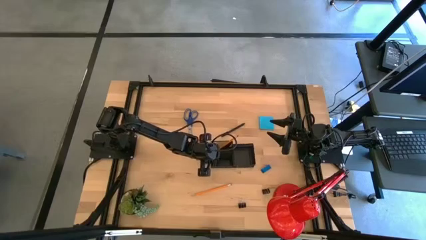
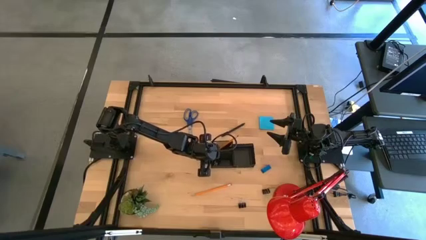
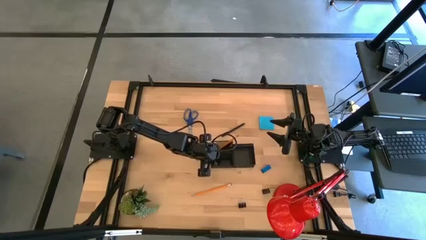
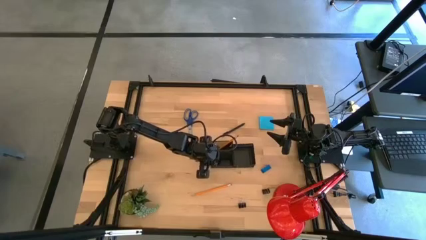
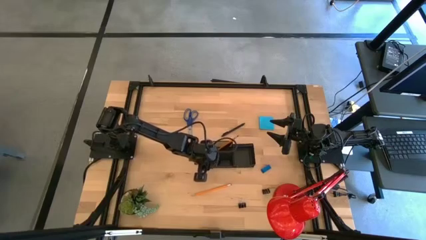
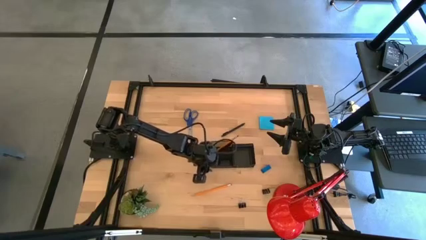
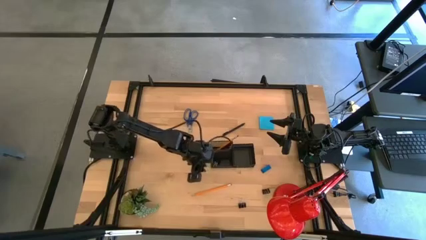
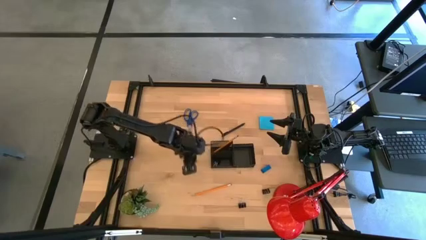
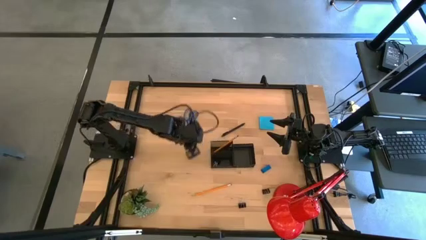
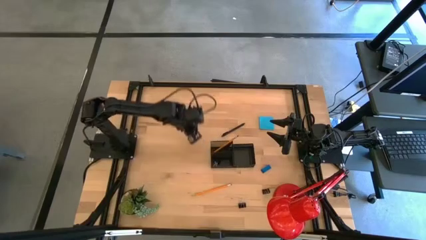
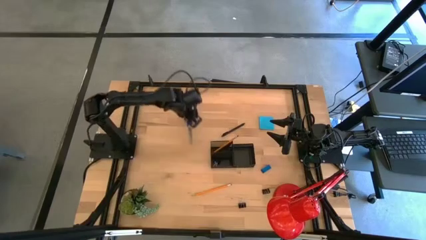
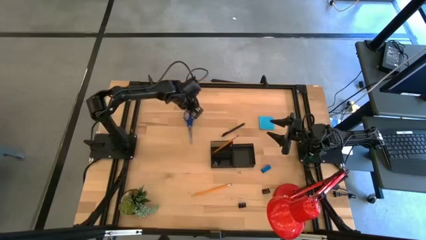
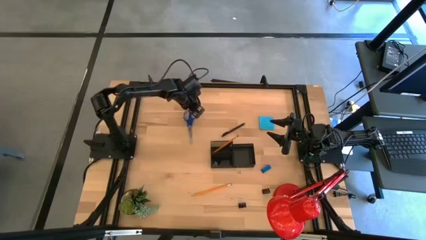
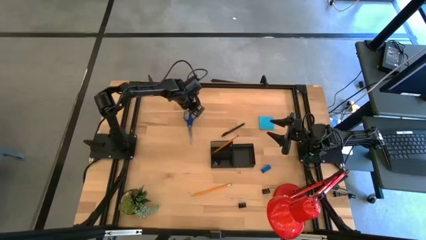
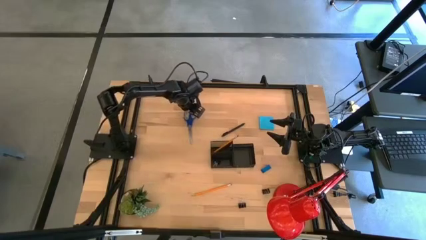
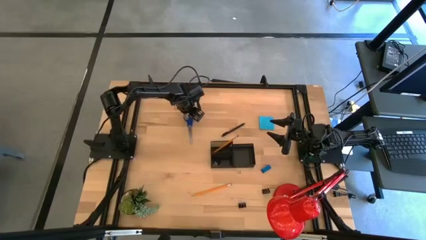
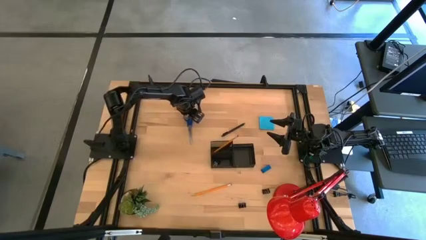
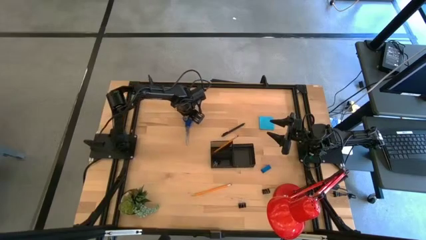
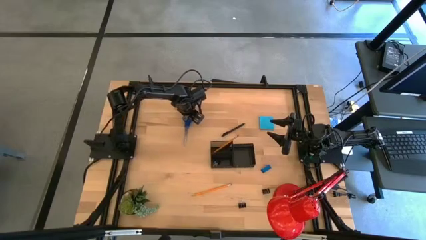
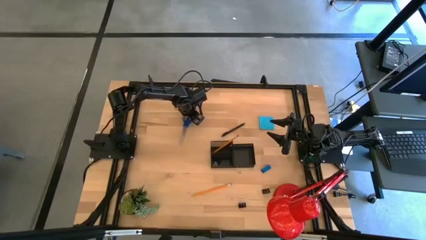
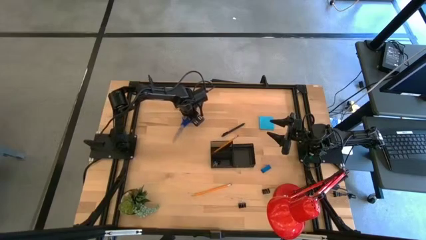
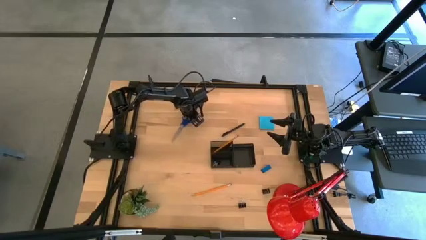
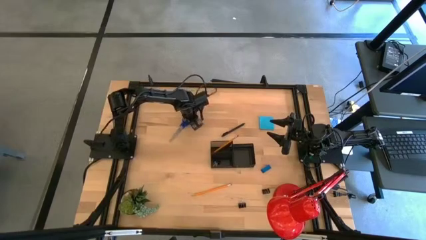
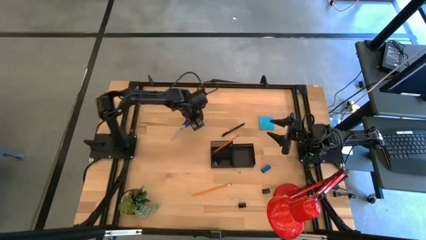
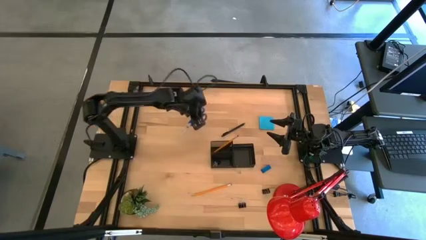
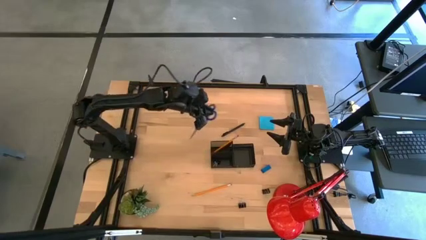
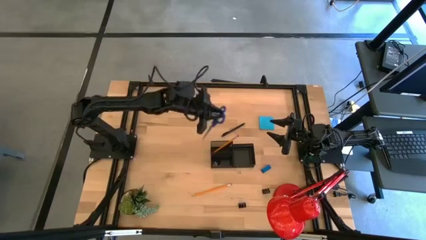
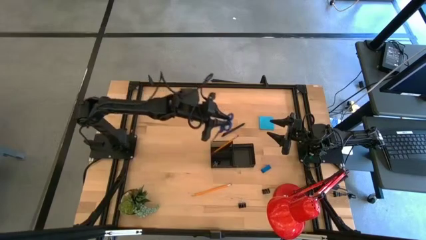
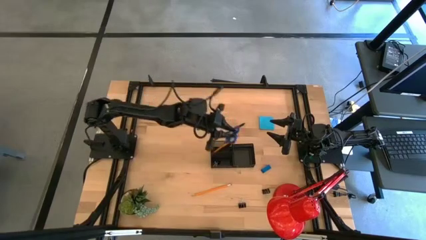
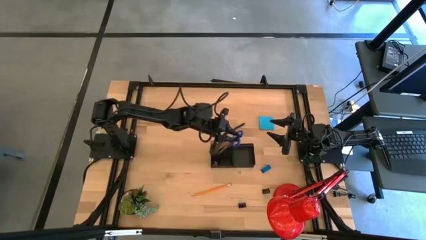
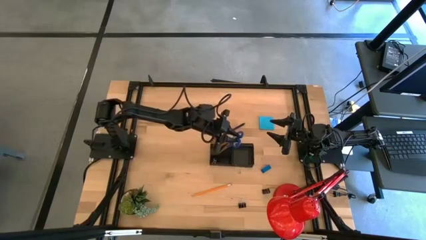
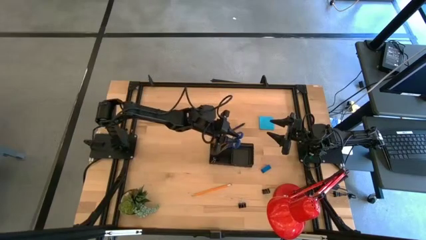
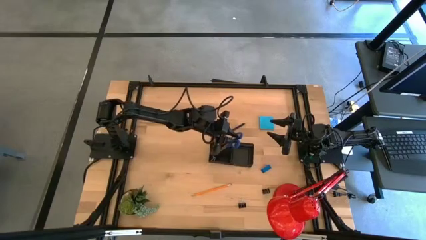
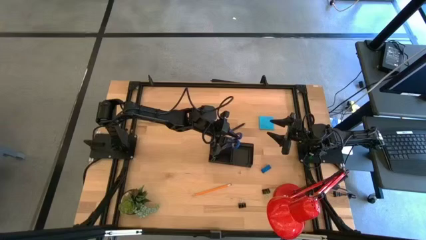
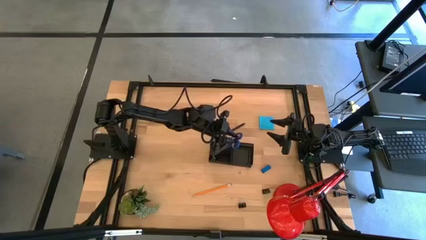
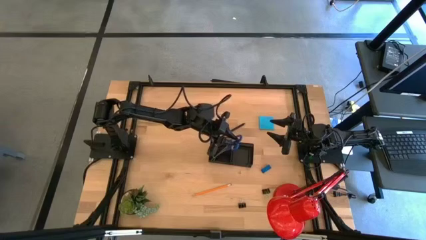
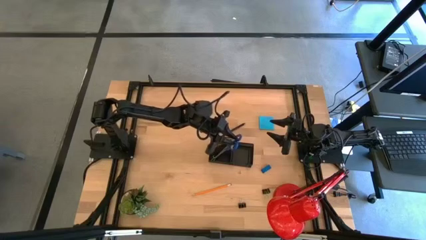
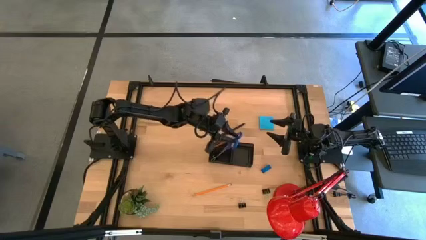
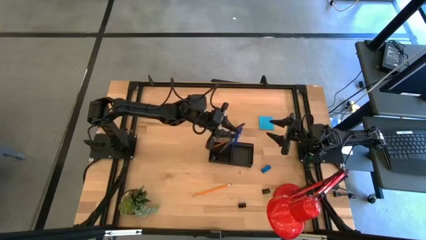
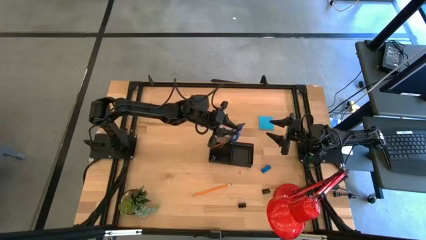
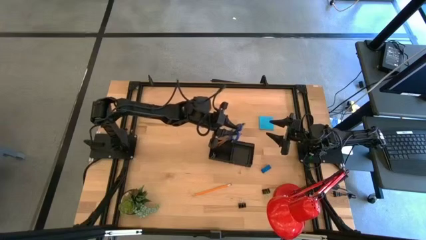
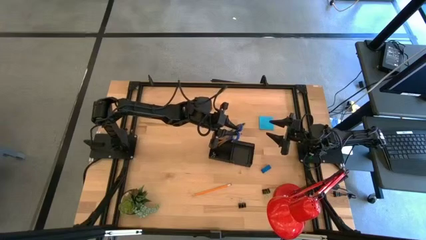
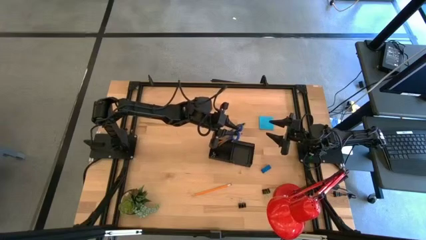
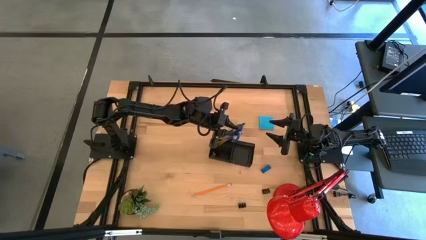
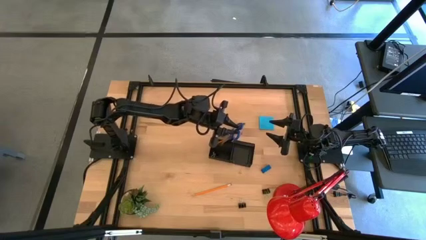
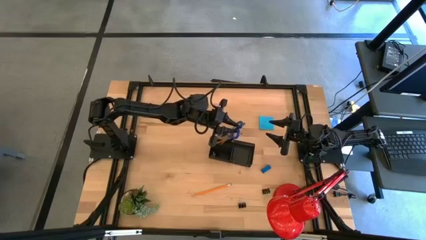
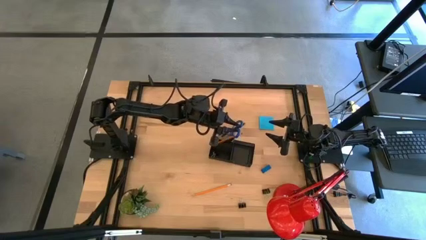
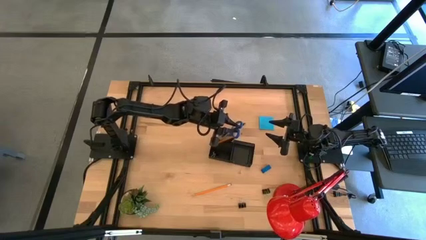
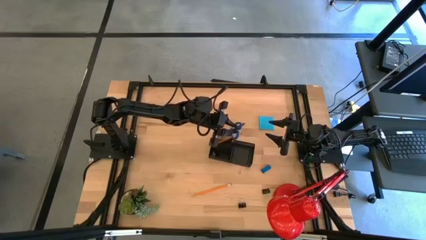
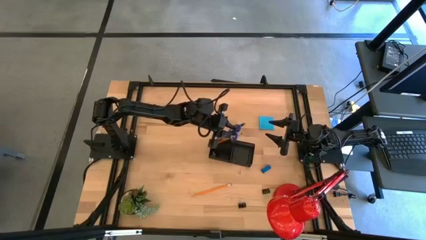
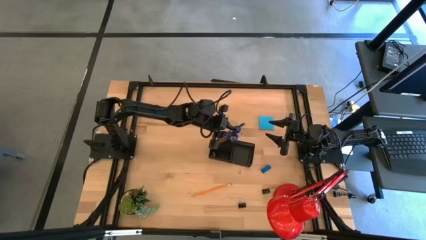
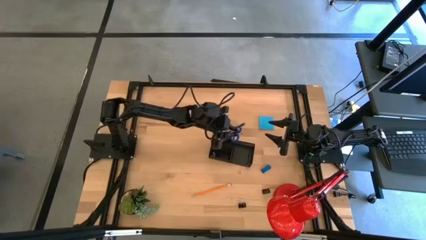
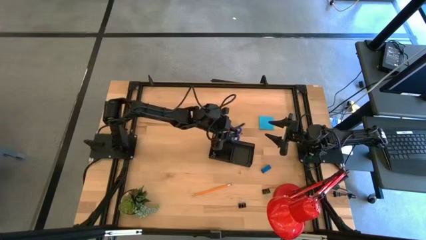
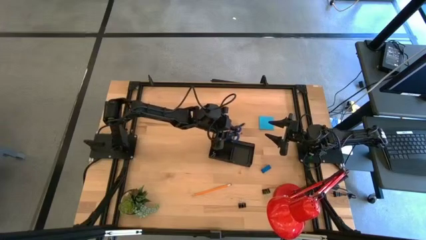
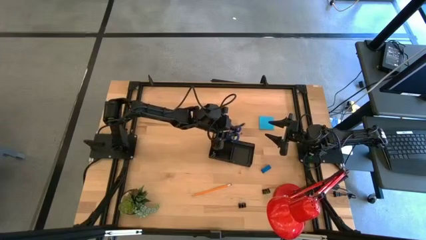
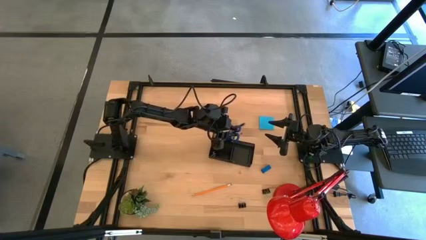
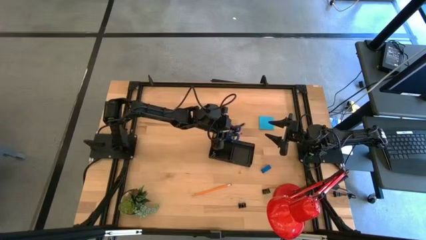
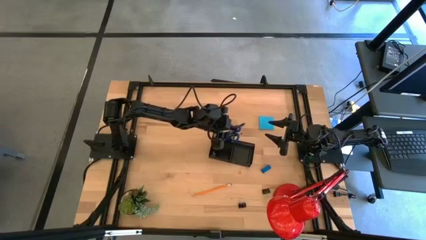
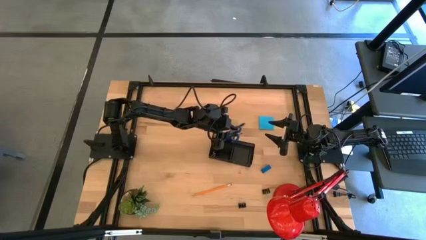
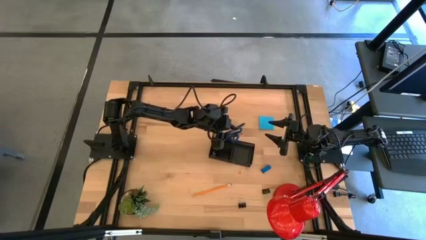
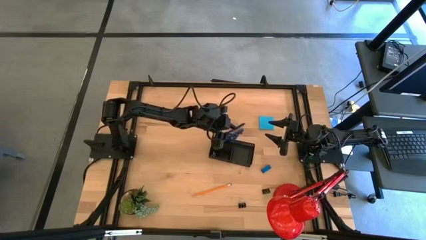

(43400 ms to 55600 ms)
Task: Pick and place office supplies into organizer
Put the blue scissors into the black desk organizer

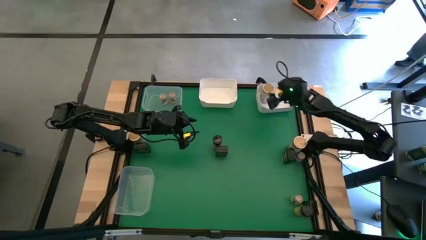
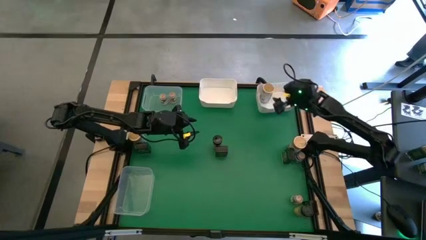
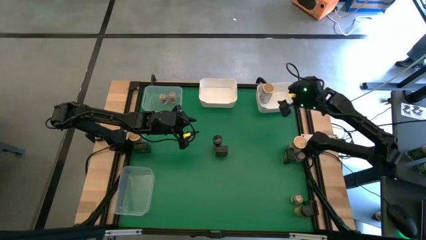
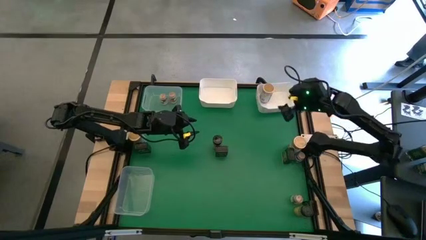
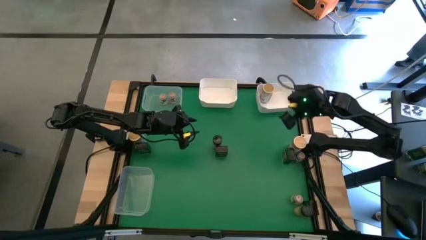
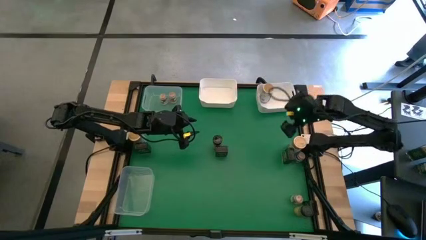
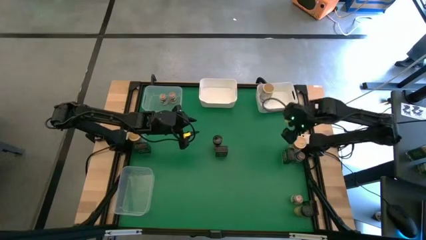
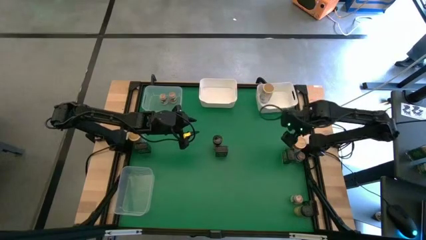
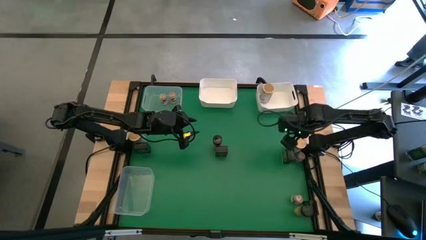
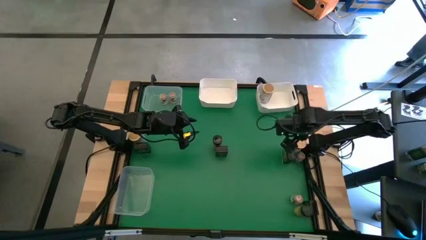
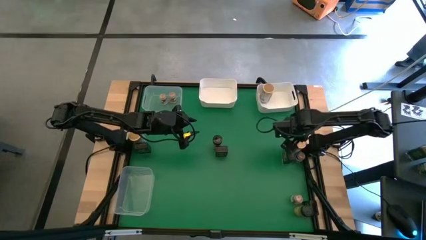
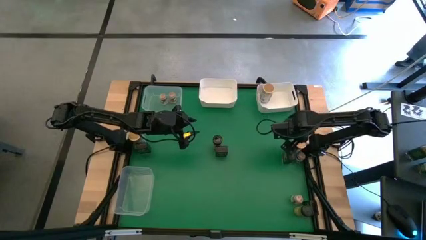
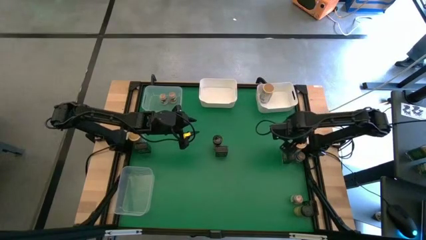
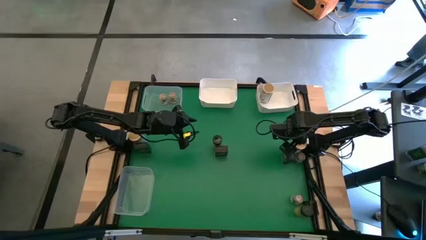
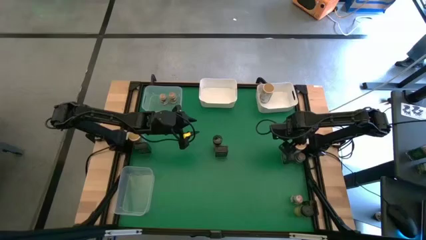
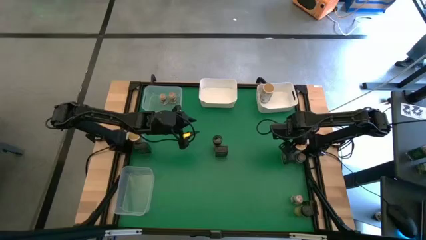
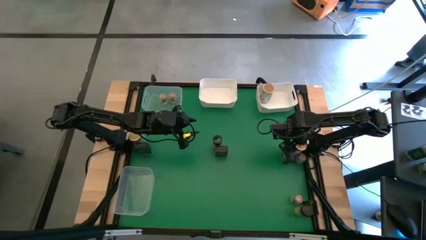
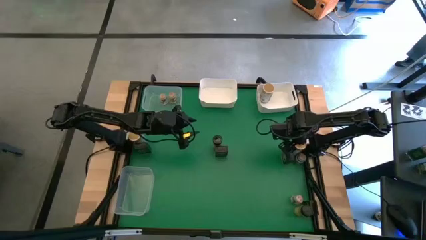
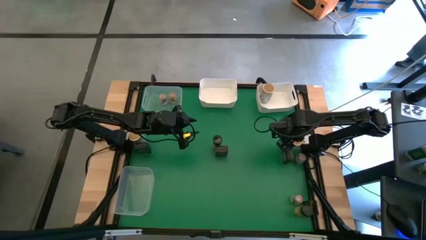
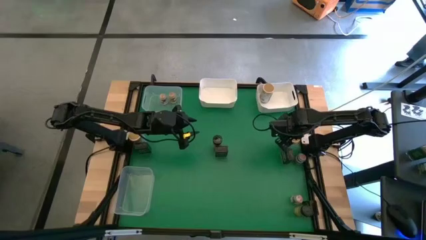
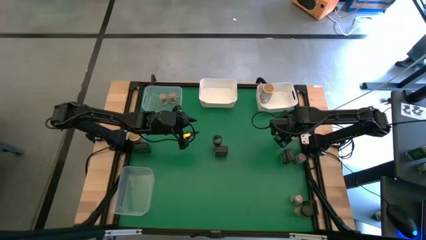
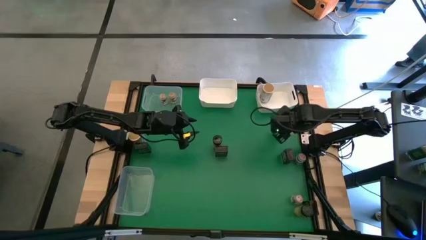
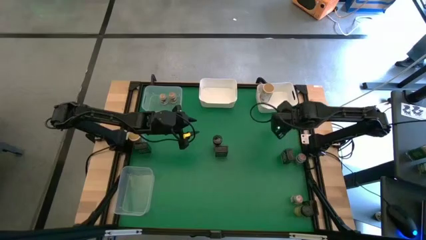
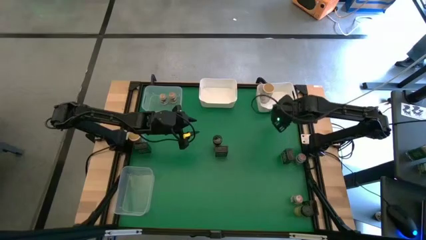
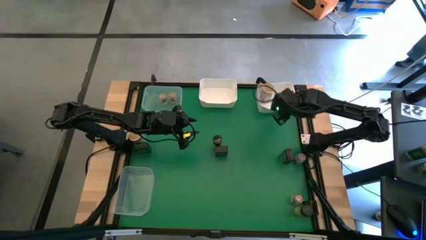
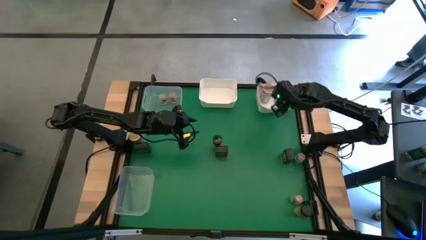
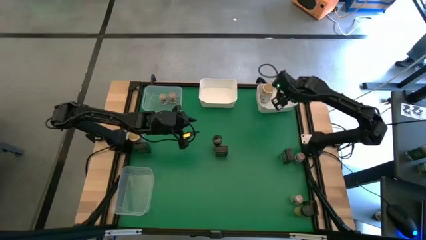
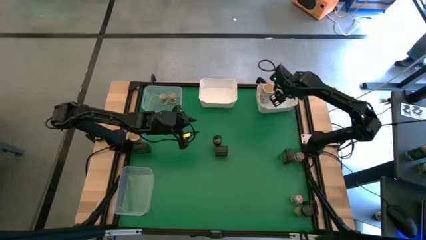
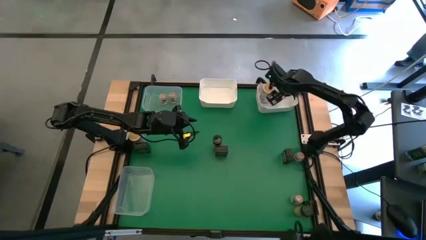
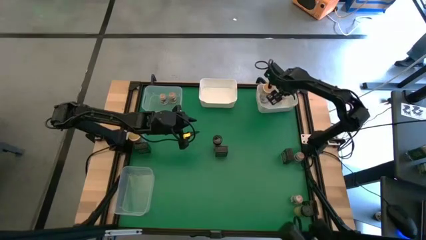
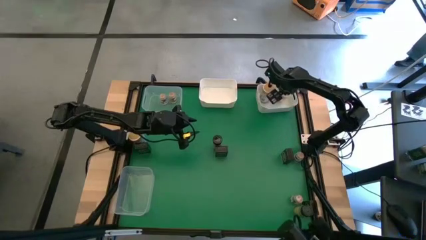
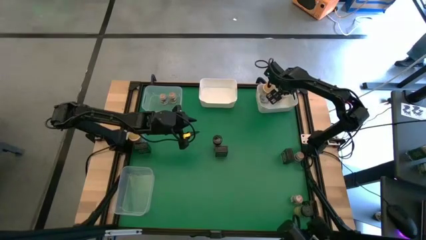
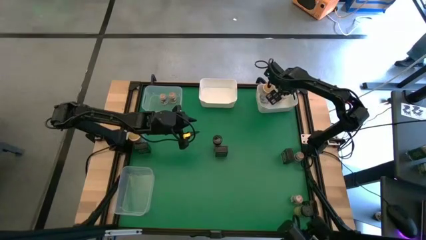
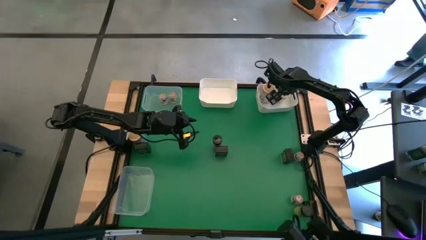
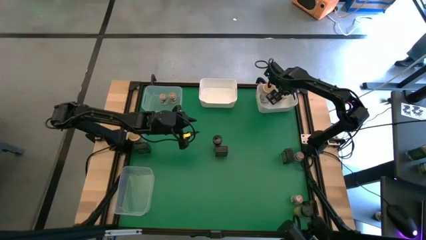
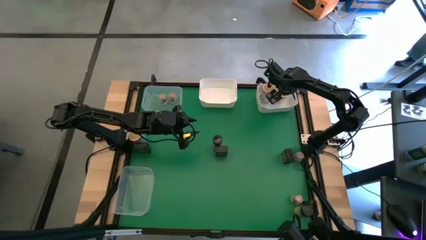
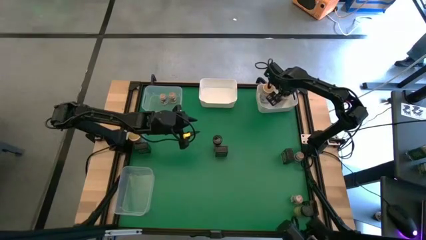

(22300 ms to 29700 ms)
Task: Sort spices by type
Put the right big brown seasoning bottle into the right white bin
